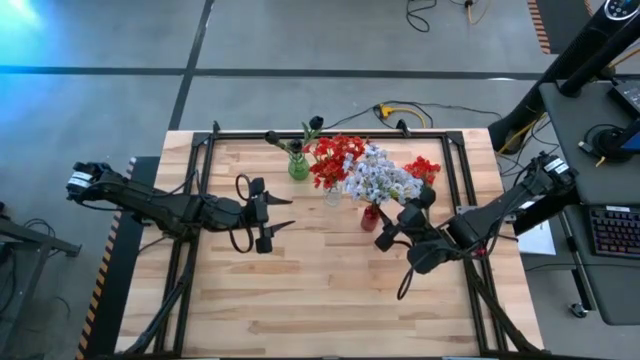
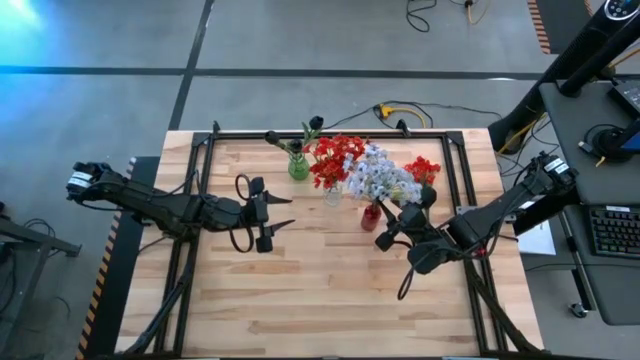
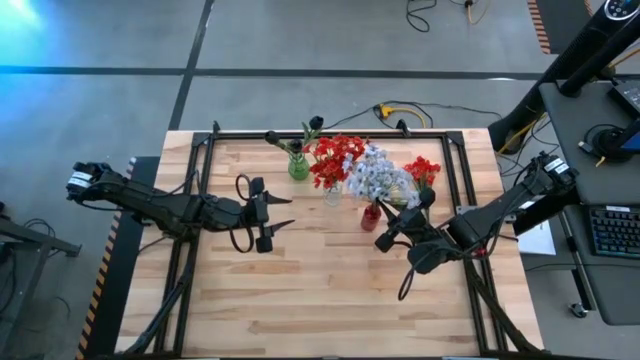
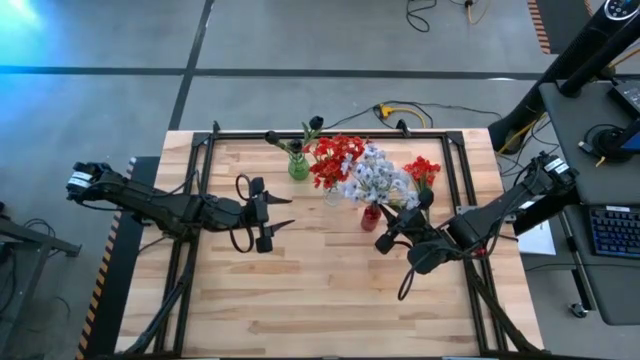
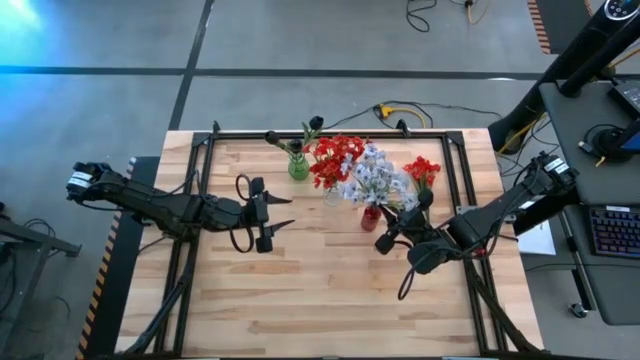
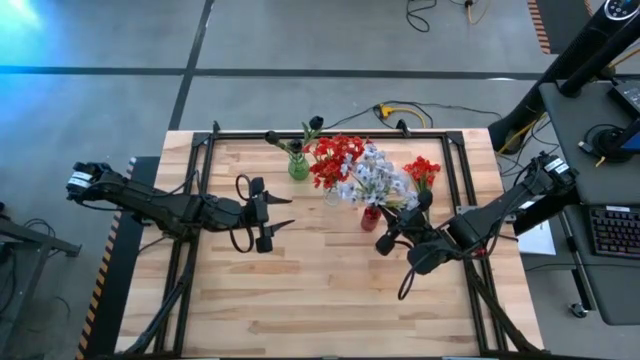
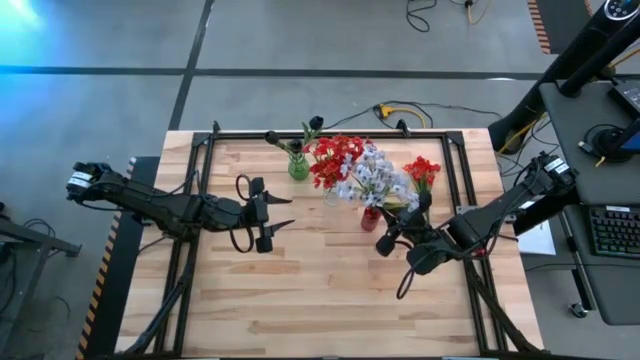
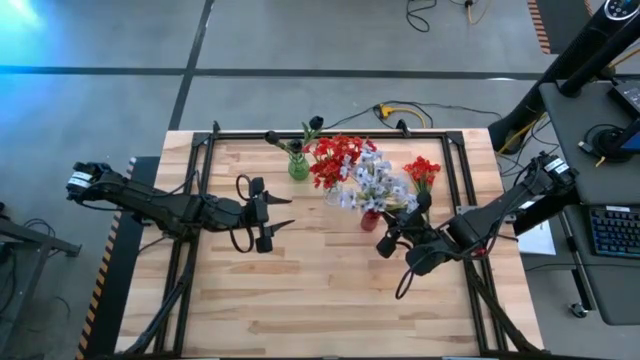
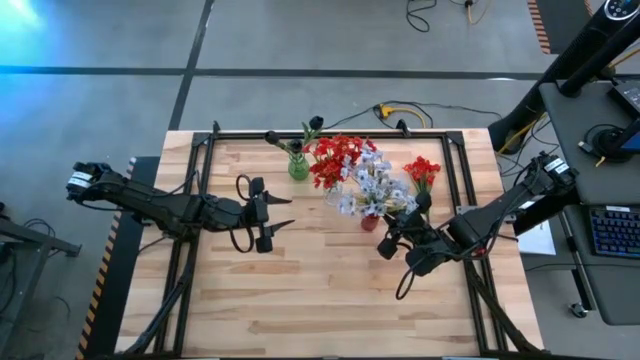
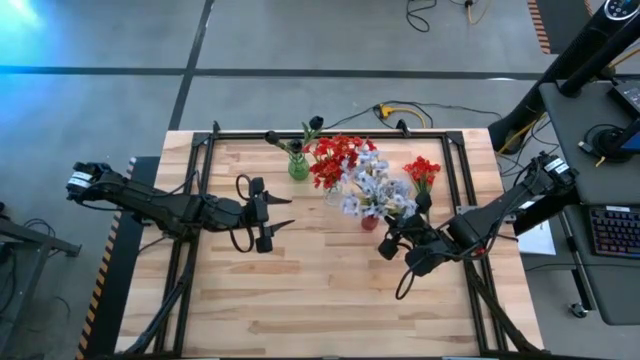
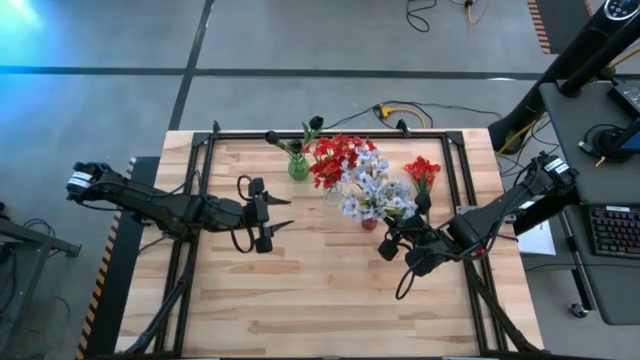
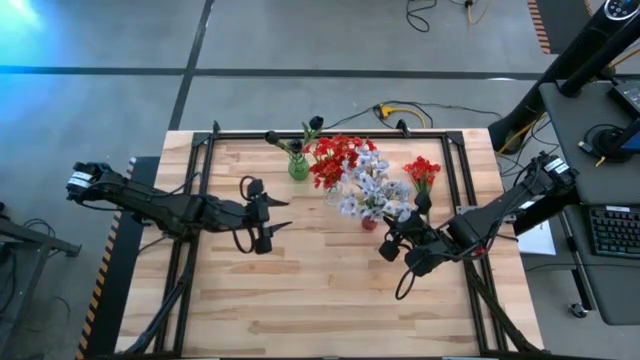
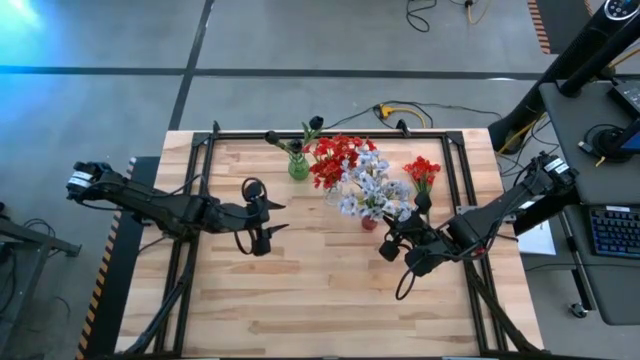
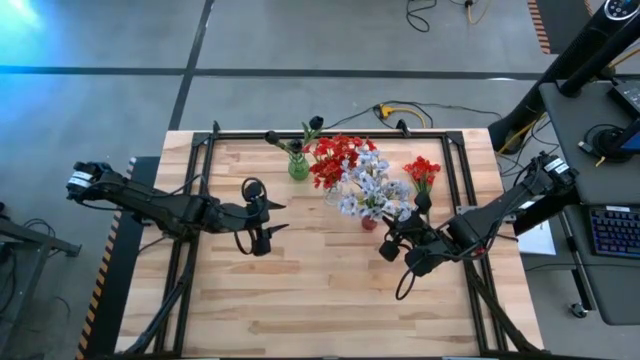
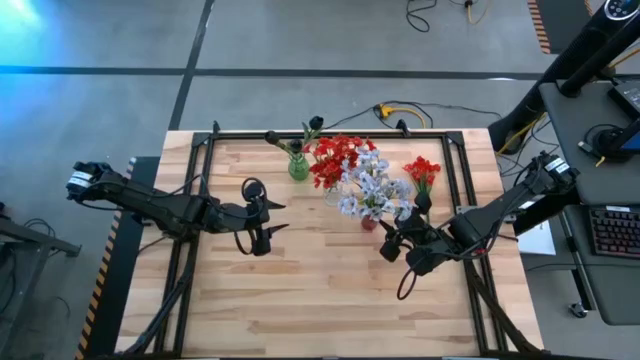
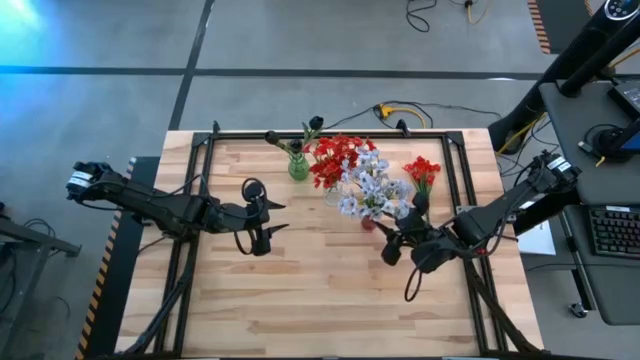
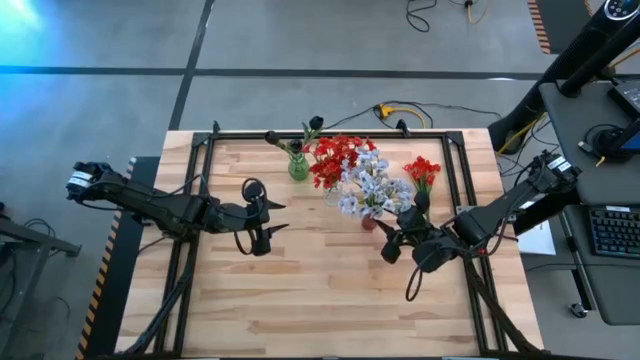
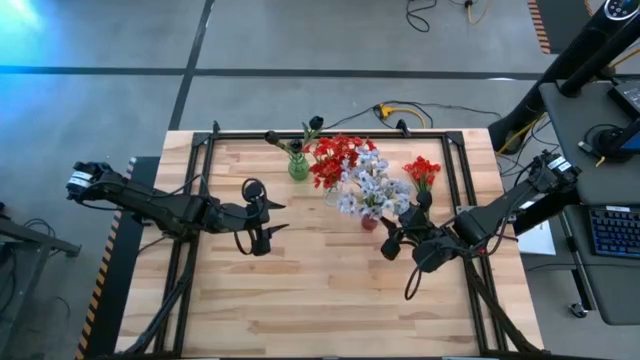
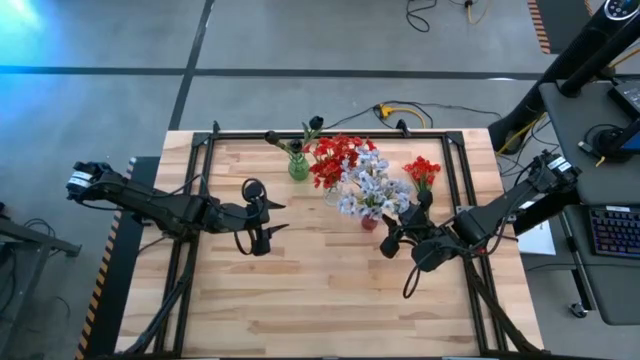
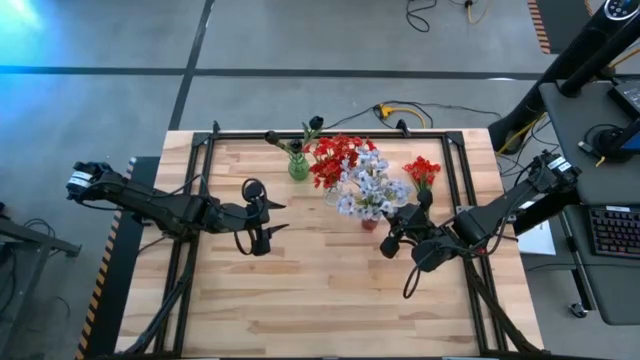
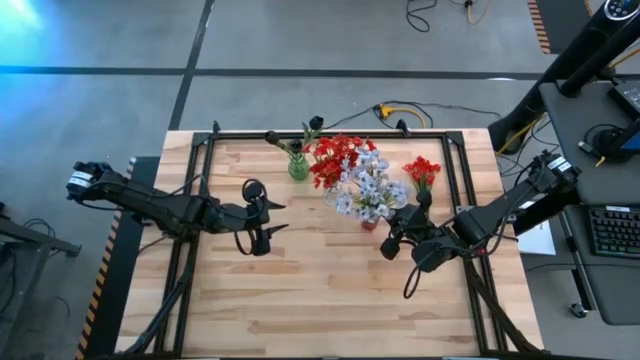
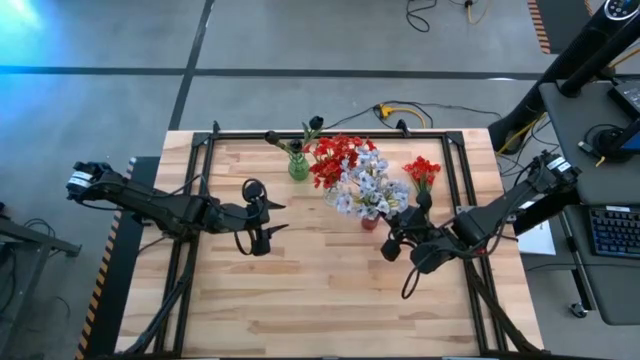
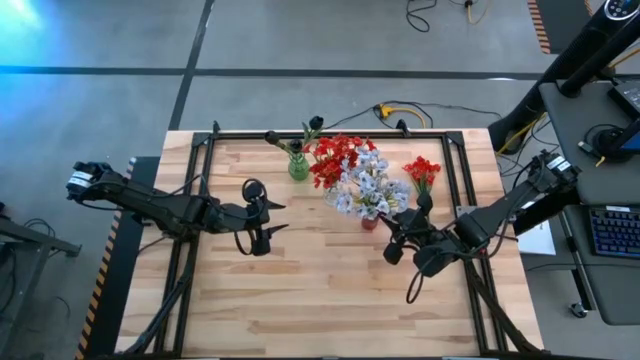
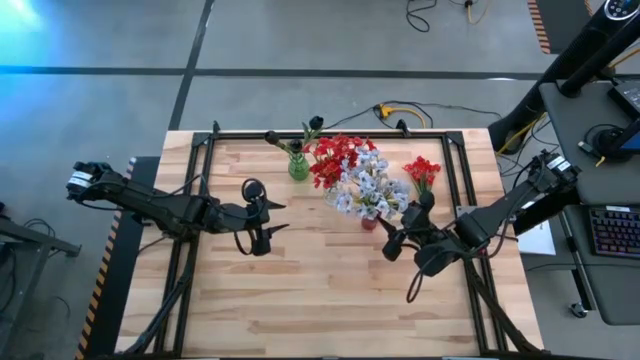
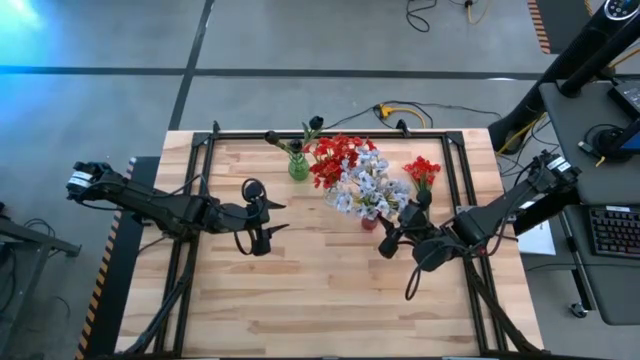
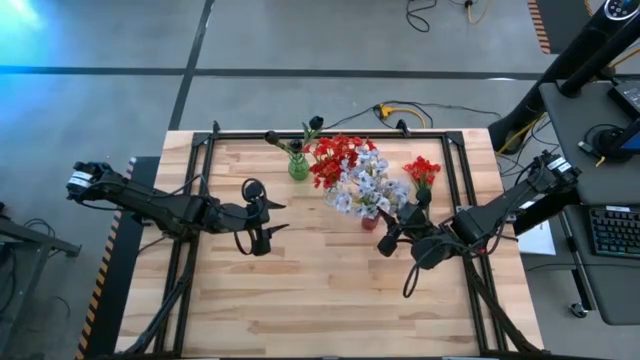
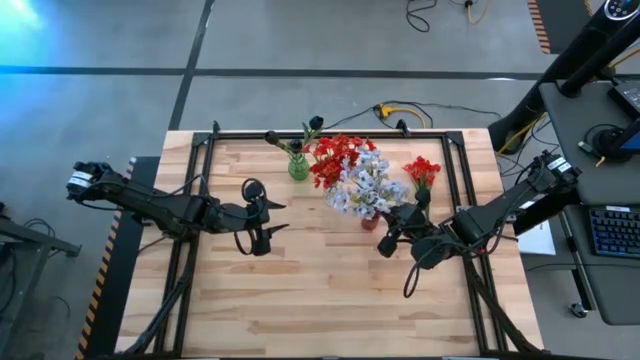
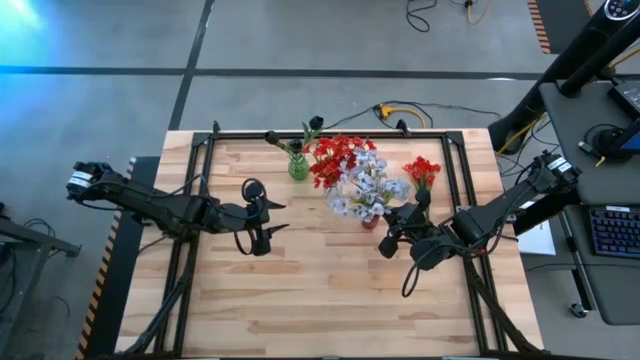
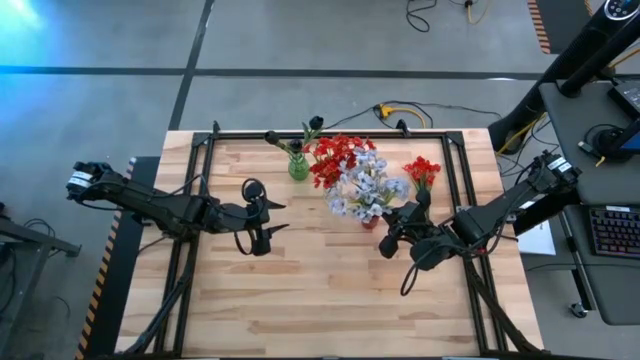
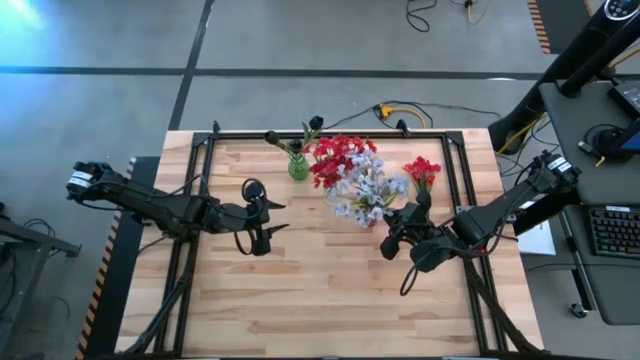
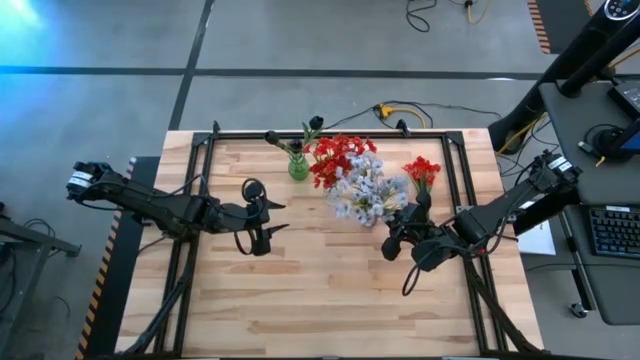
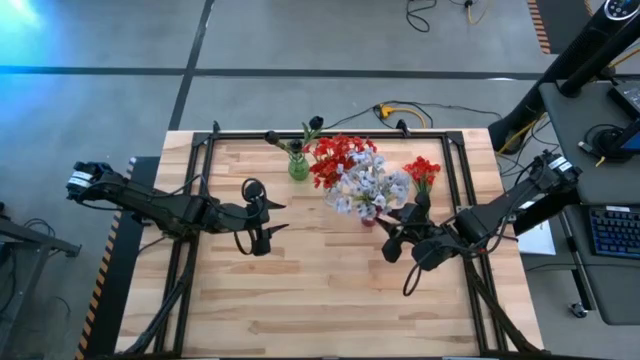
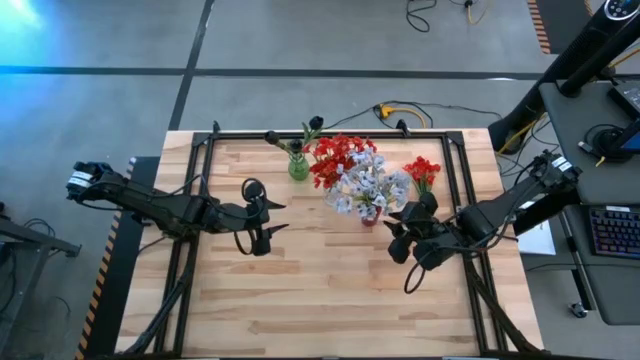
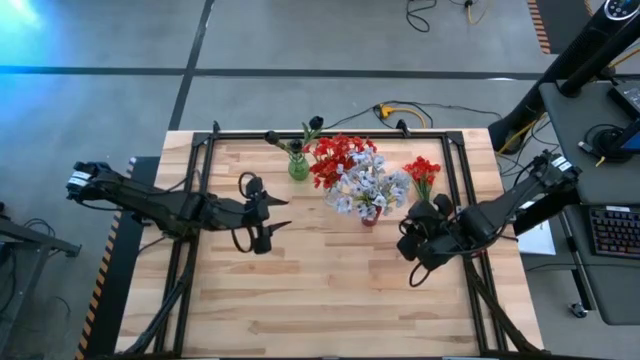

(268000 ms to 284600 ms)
Task: Sort flowers into vase by color
Put the white flowers into the red vase

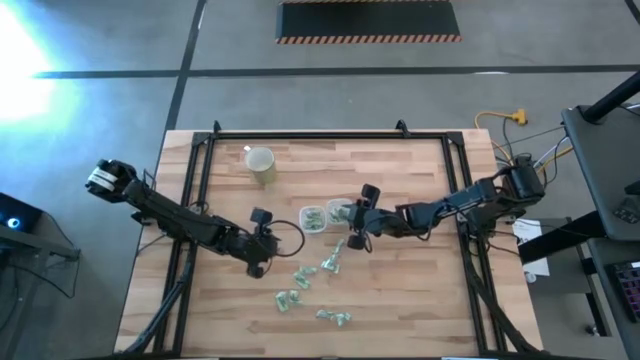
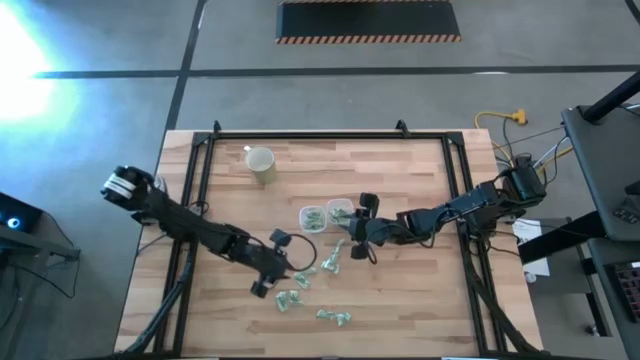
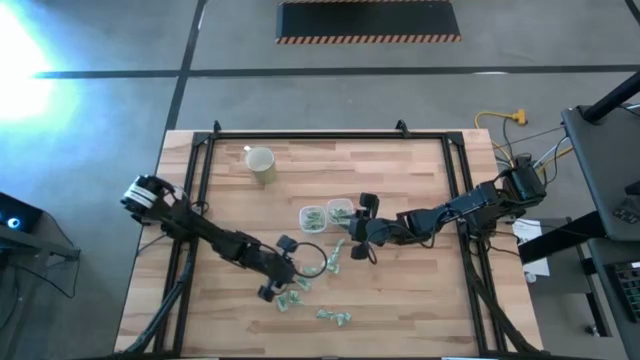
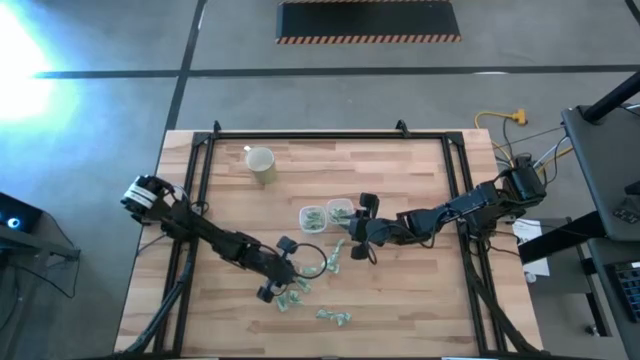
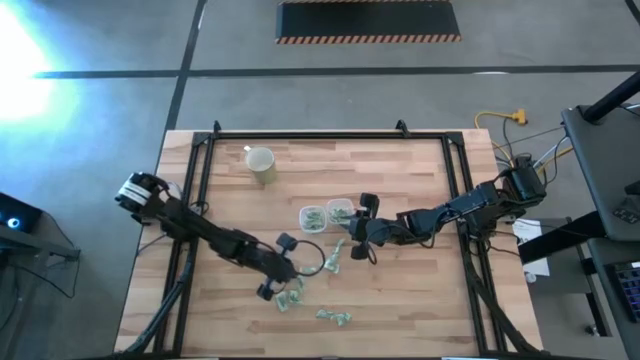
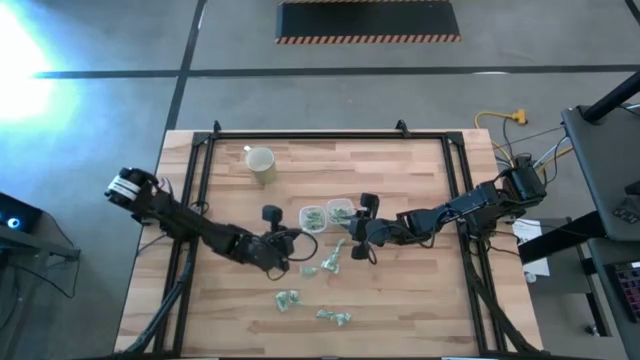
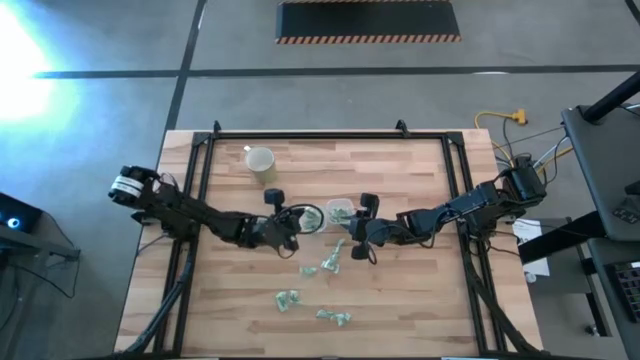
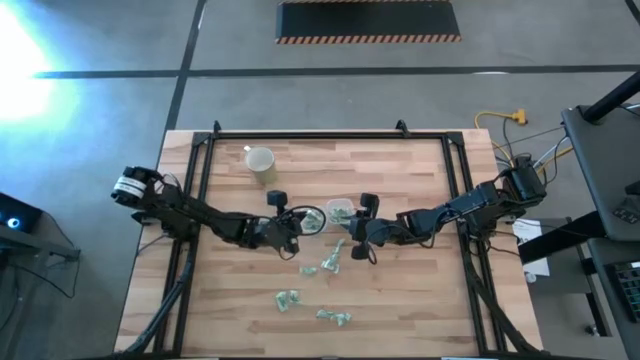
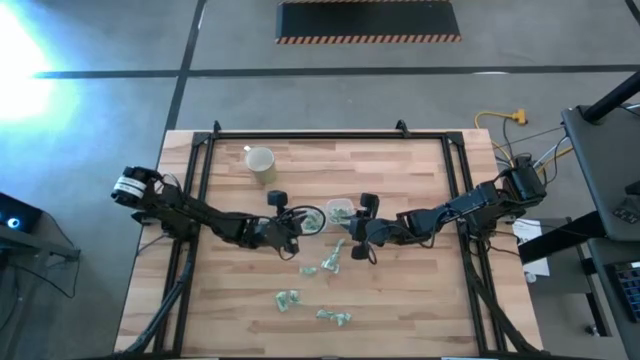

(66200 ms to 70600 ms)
Task: Pick and place items into bin
Put the stevia packet into the left transparent bin
